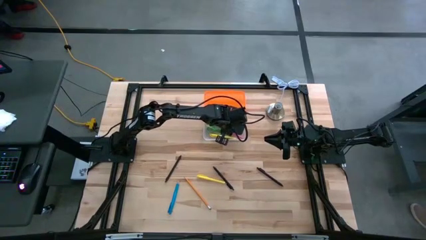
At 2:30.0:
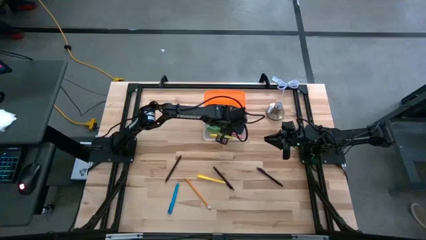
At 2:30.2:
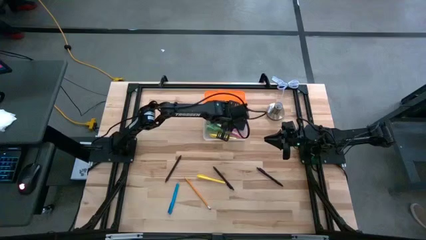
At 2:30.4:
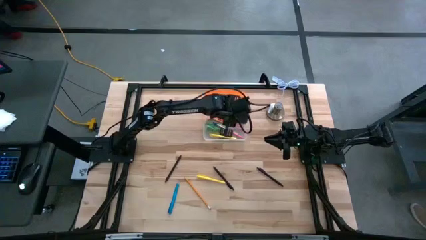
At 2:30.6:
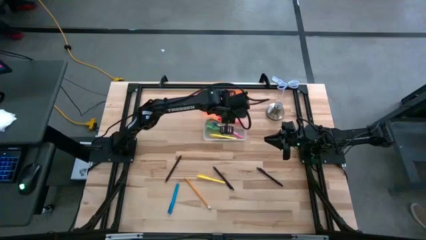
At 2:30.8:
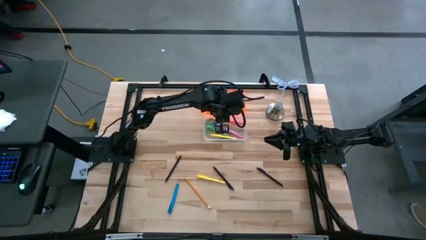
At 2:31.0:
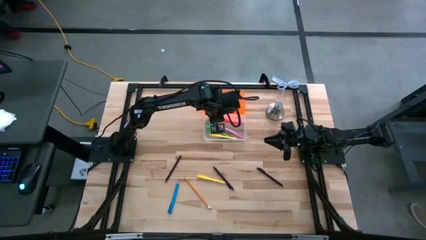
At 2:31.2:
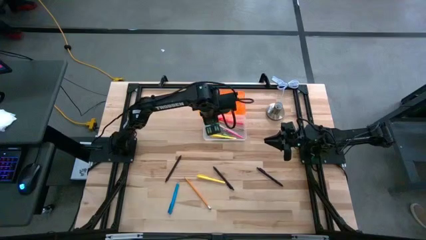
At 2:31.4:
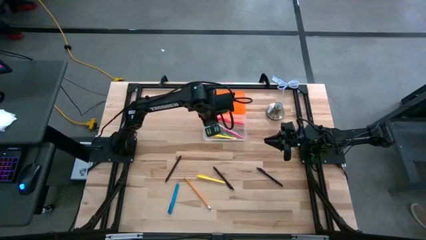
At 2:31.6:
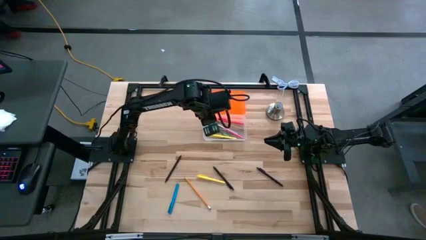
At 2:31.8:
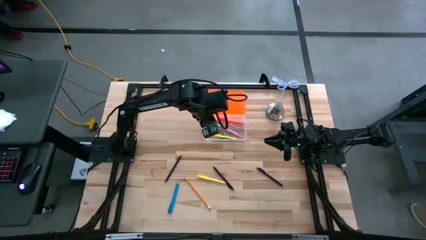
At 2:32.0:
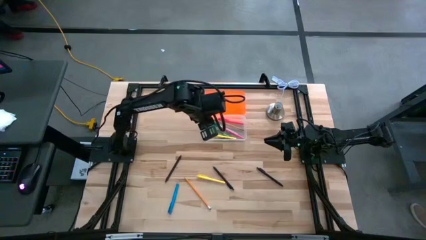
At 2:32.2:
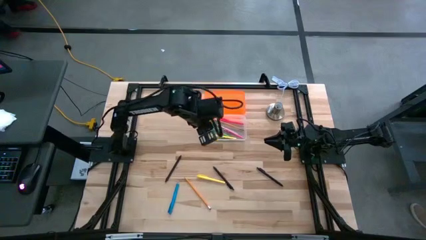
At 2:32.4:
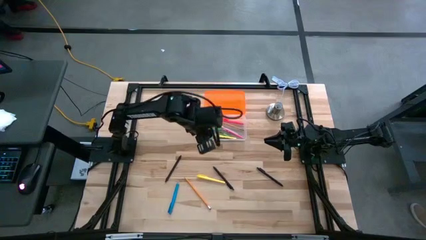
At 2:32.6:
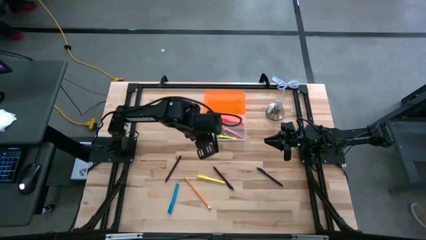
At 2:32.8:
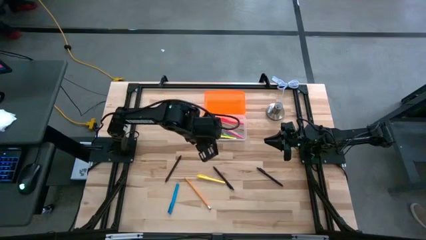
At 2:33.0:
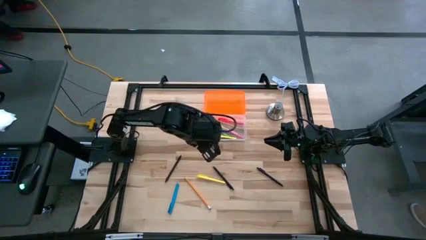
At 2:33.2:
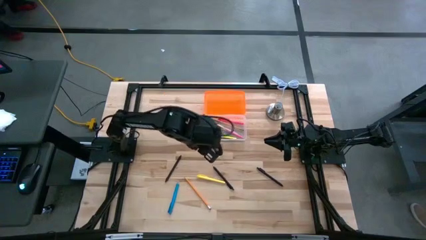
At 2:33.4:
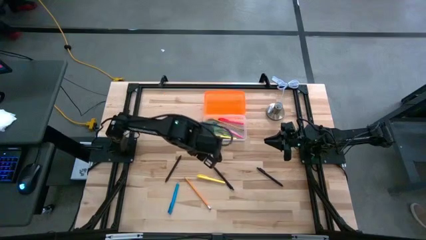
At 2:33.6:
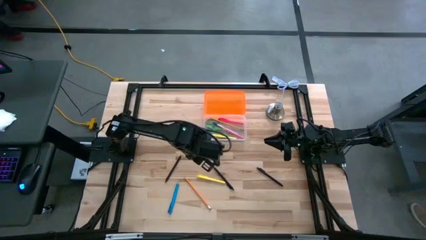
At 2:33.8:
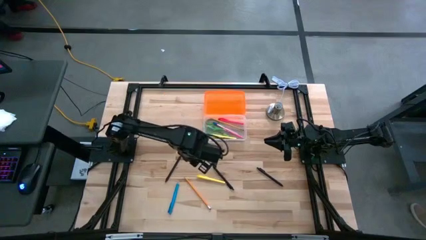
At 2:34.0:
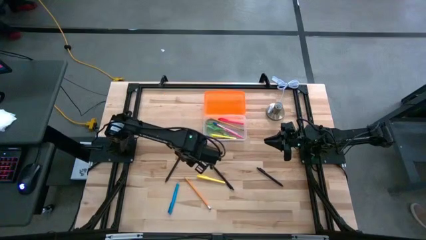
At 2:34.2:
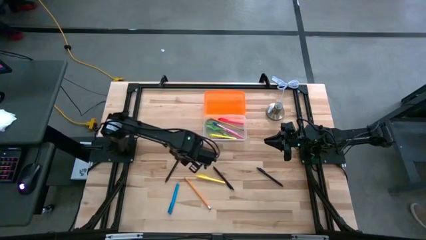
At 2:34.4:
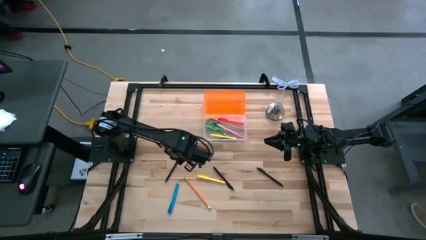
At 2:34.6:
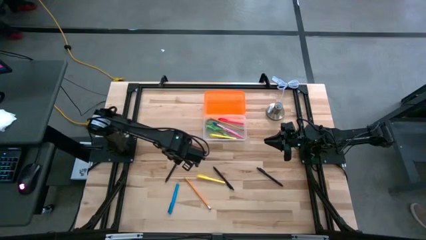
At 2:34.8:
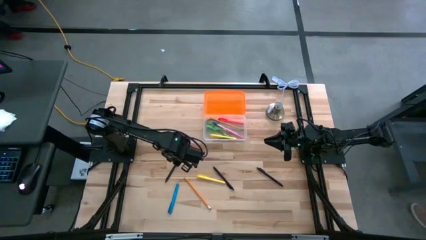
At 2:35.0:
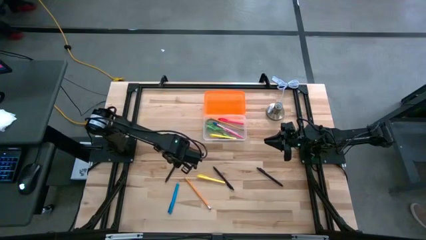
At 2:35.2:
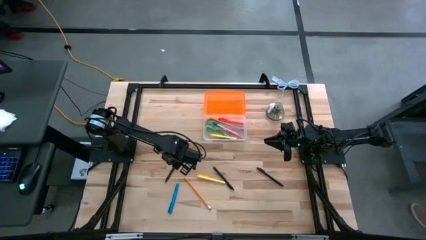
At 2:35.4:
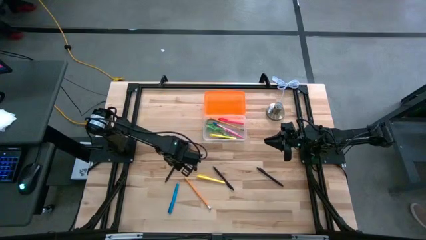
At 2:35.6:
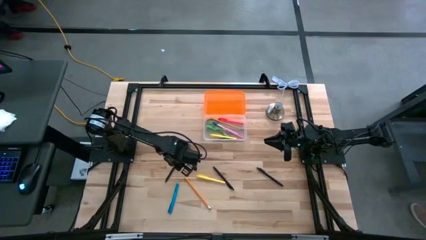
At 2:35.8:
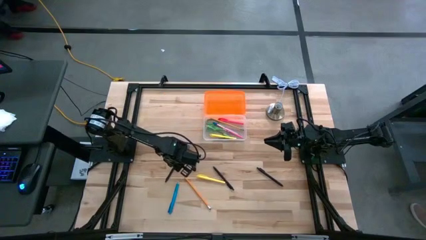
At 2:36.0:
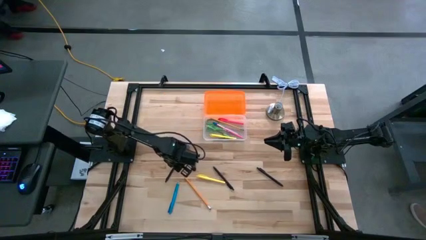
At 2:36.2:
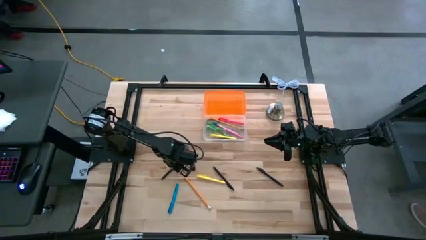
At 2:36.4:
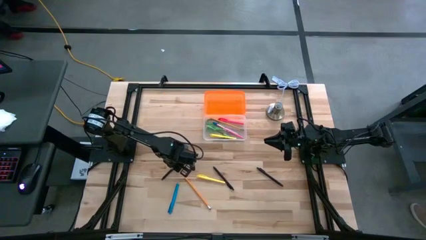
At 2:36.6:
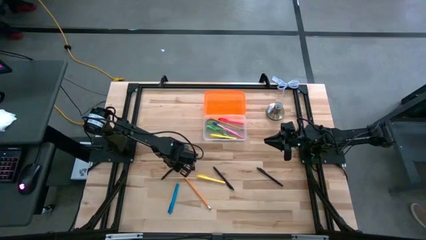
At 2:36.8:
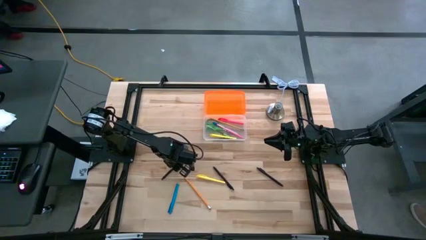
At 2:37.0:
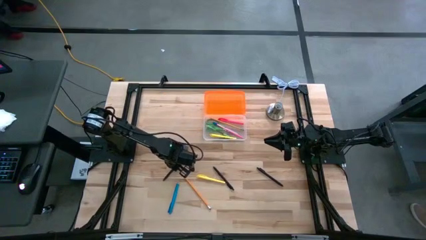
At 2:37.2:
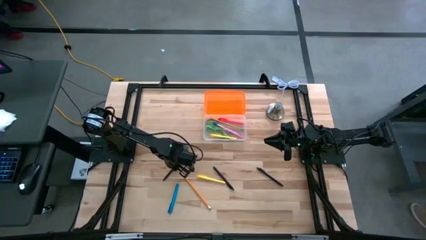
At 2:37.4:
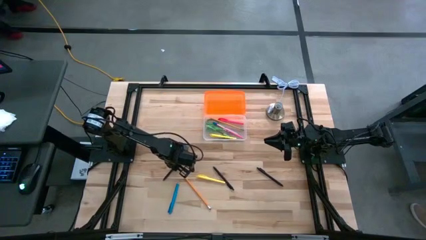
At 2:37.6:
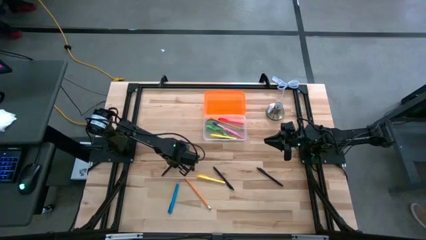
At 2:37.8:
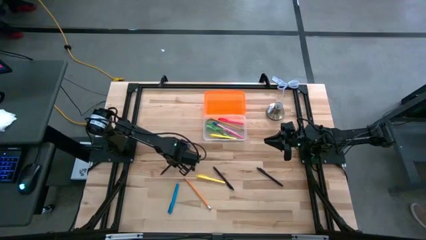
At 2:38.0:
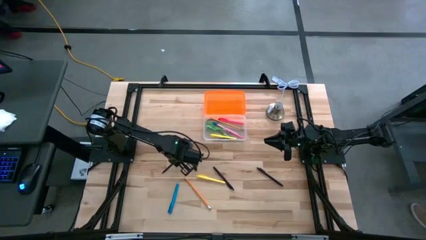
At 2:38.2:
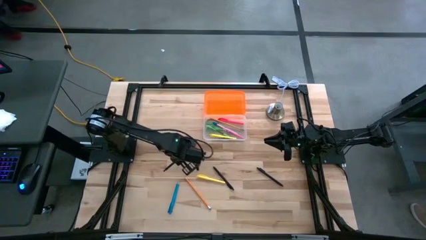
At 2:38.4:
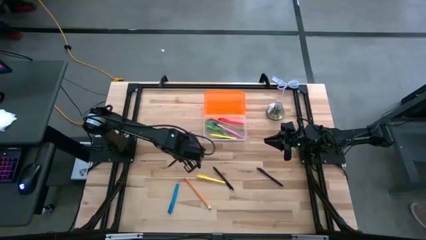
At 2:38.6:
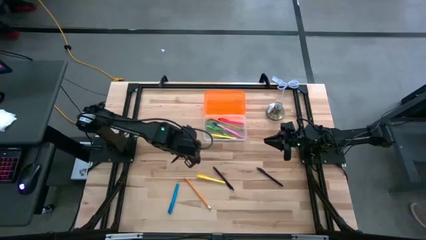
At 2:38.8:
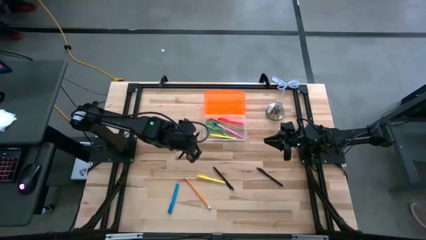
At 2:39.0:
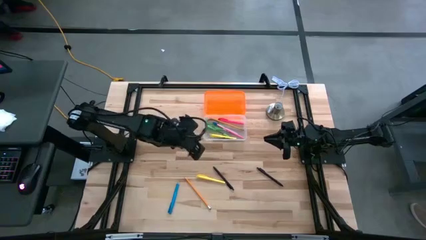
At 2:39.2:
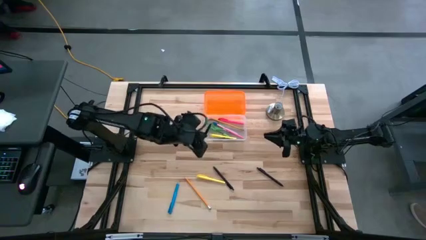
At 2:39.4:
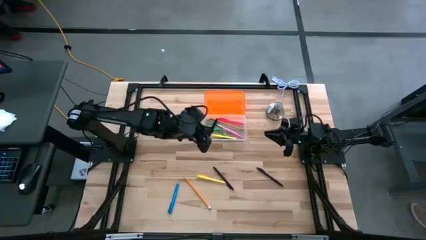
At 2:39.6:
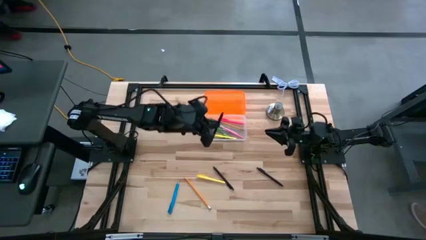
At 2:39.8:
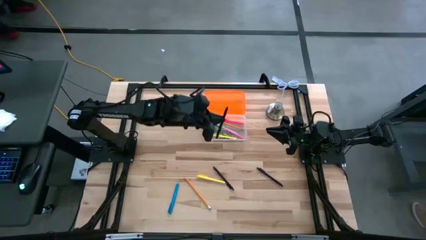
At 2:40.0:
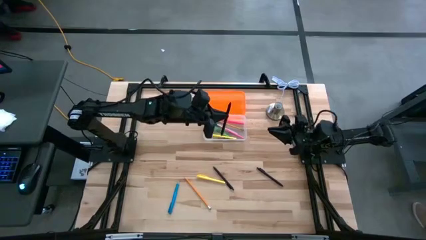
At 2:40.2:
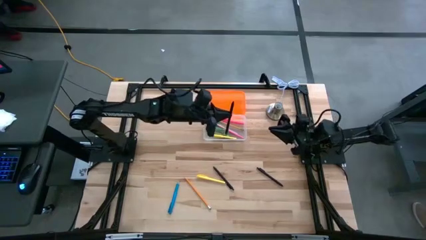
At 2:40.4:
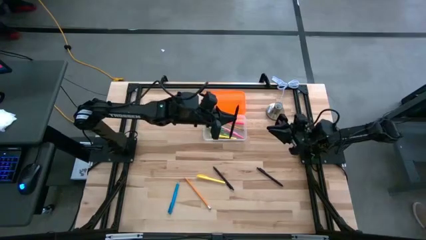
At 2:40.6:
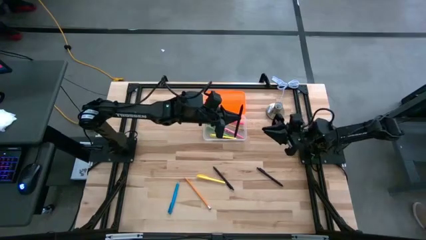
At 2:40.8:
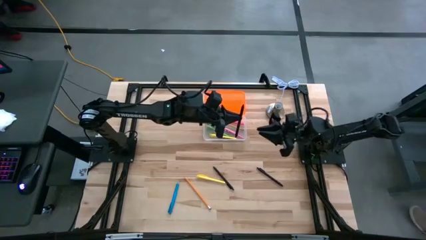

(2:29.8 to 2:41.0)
Task: Pick & place school supplies into a supply box
Put the left black pen into the supply box

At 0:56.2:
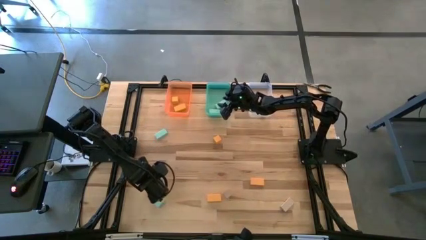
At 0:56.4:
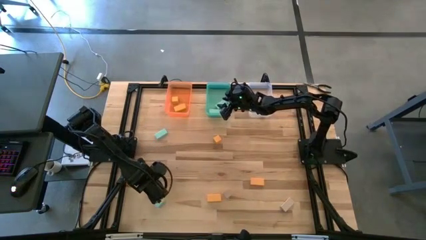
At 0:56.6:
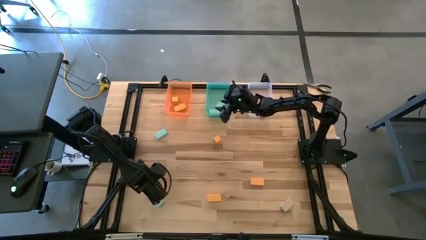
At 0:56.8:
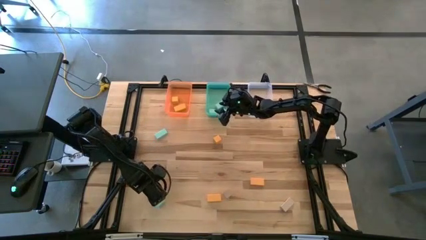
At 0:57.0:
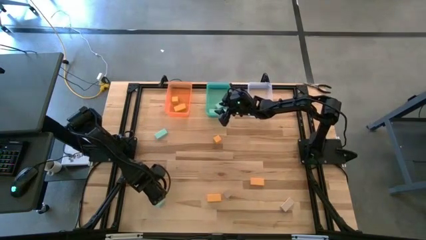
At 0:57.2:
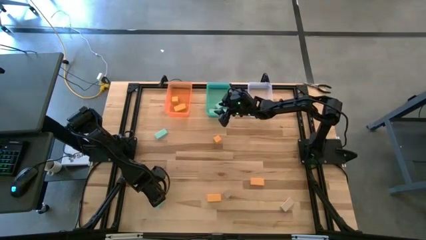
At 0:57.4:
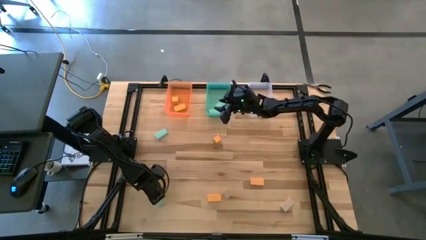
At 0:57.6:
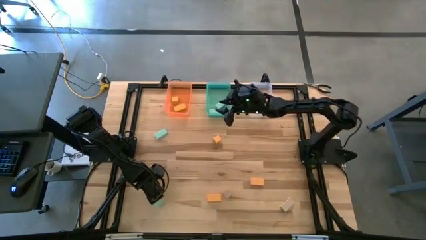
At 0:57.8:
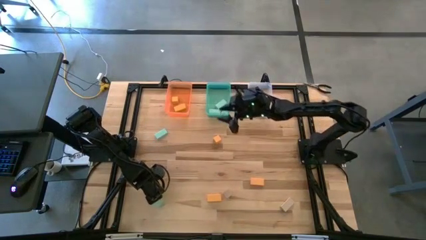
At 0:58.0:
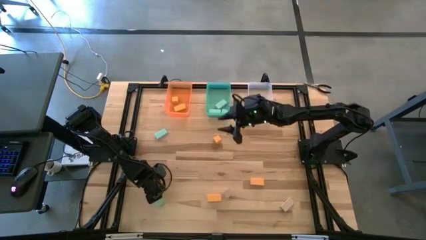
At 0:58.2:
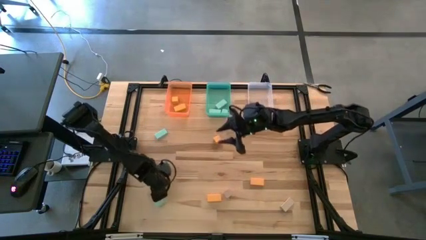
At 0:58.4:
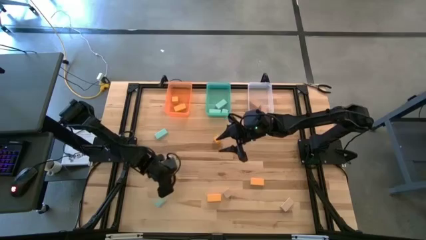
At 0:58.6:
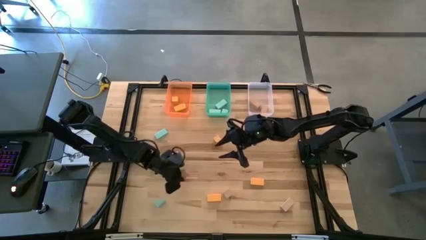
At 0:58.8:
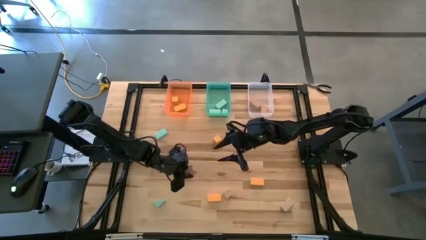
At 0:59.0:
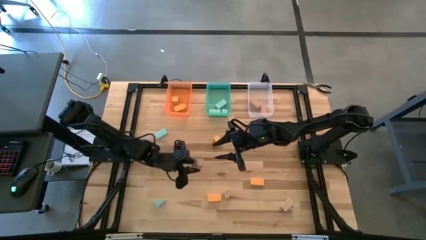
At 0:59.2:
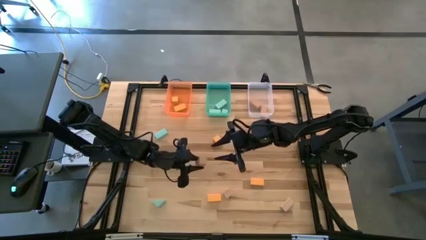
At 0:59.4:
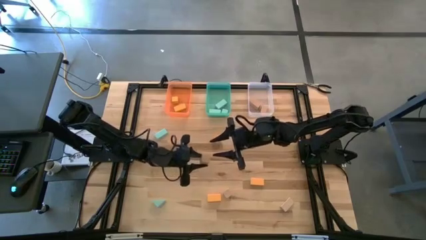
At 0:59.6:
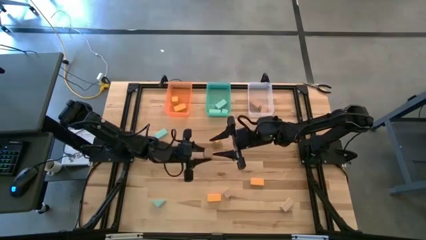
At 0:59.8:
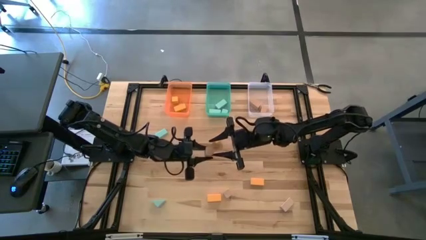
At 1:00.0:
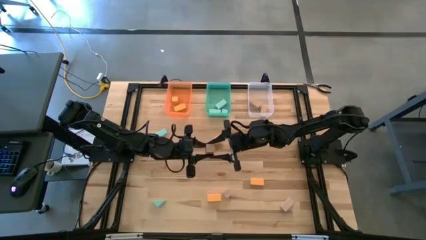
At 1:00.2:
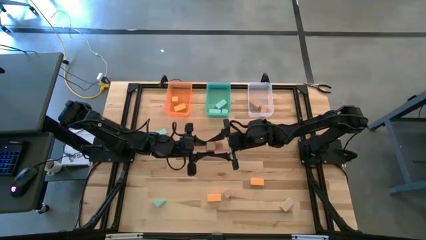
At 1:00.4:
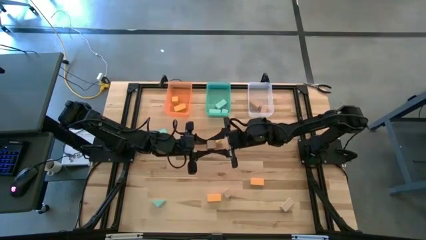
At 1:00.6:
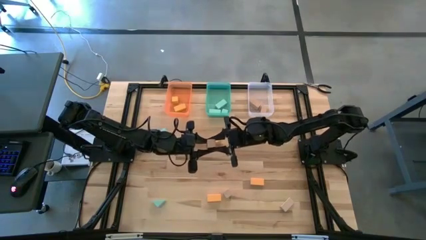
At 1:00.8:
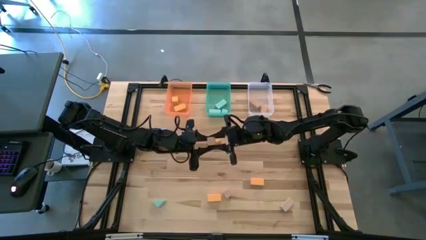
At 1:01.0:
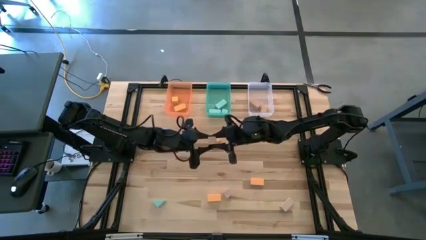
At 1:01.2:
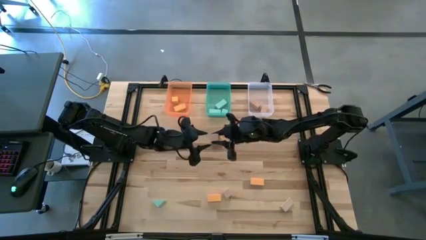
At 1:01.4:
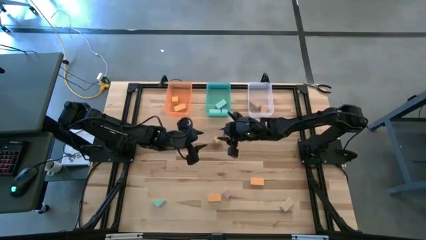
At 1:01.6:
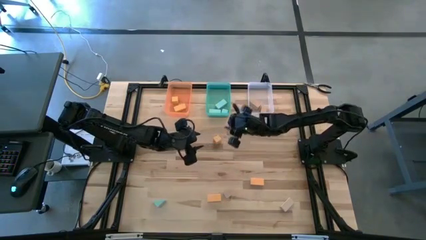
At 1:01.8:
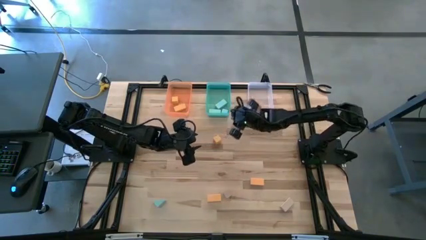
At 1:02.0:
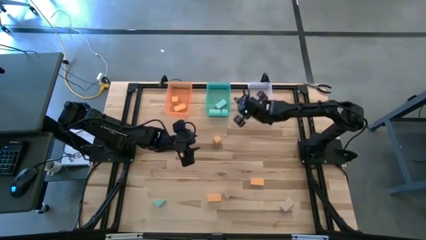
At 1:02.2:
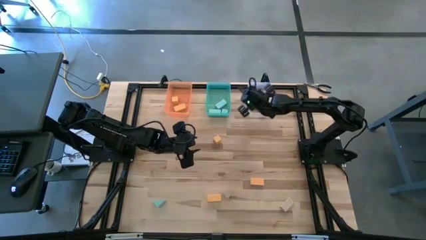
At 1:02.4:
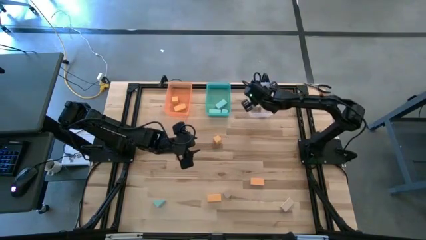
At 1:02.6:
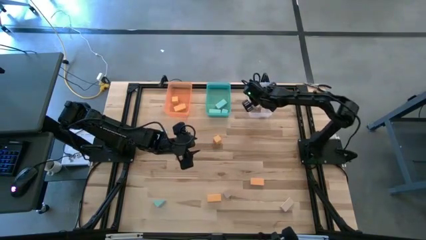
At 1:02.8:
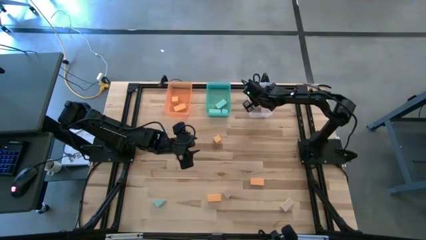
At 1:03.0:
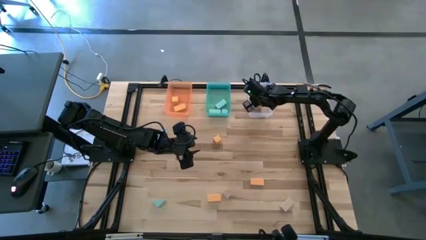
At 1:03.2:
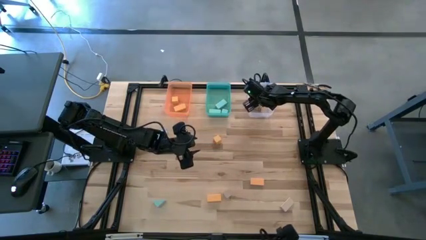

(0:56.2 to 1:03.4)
Task: Sort & place blocks by color
Put the brown block into the transparent bin
